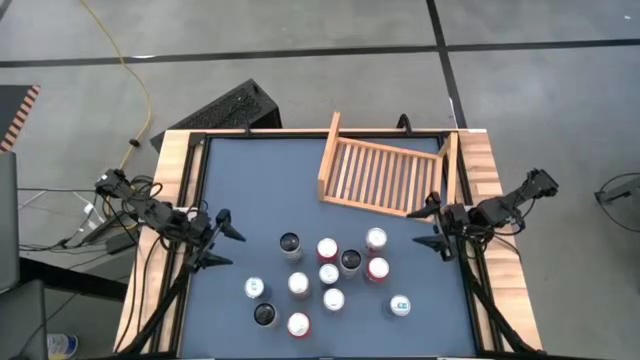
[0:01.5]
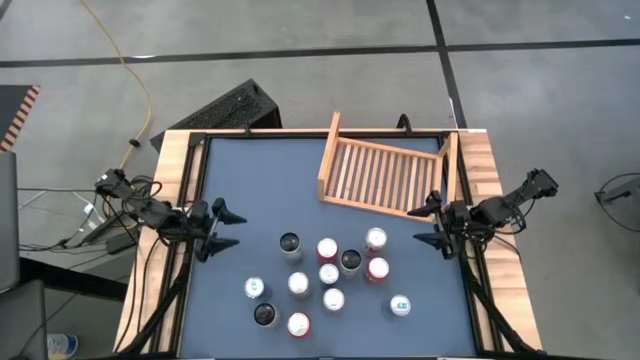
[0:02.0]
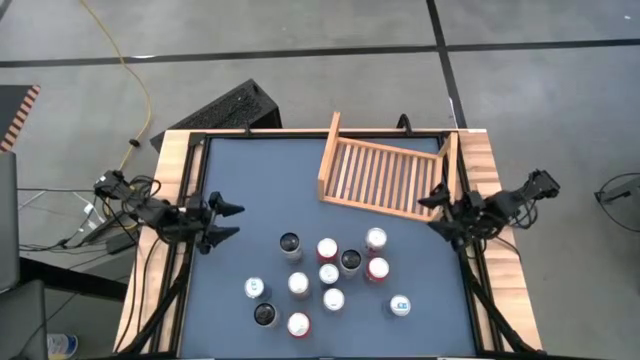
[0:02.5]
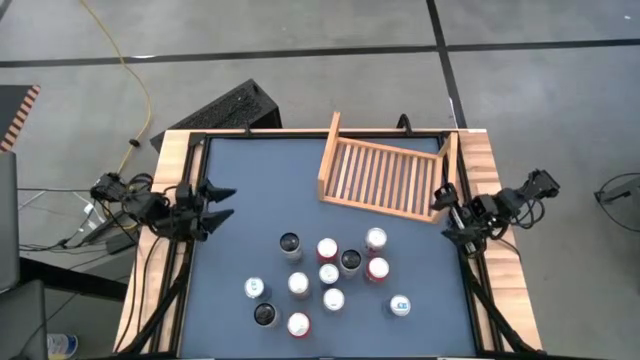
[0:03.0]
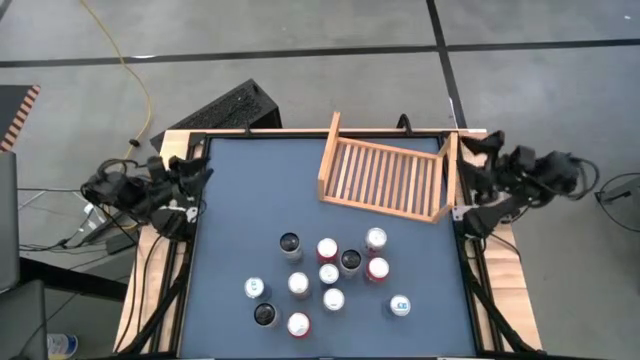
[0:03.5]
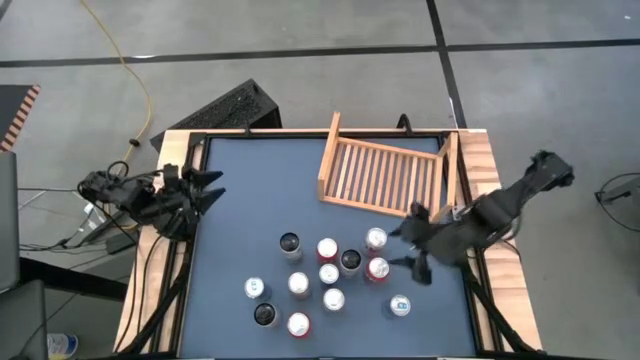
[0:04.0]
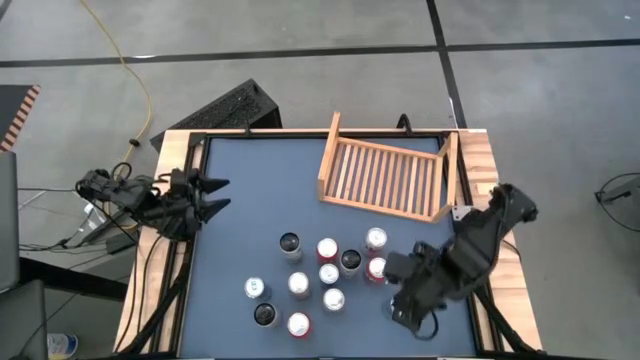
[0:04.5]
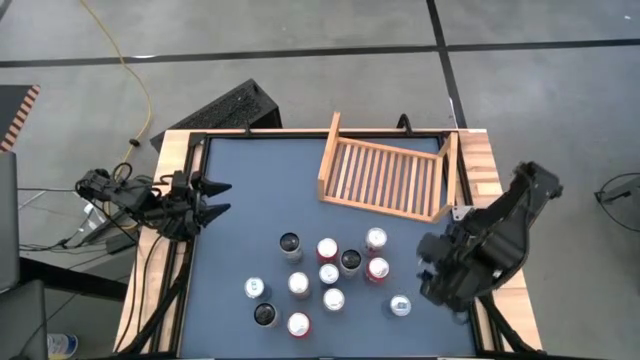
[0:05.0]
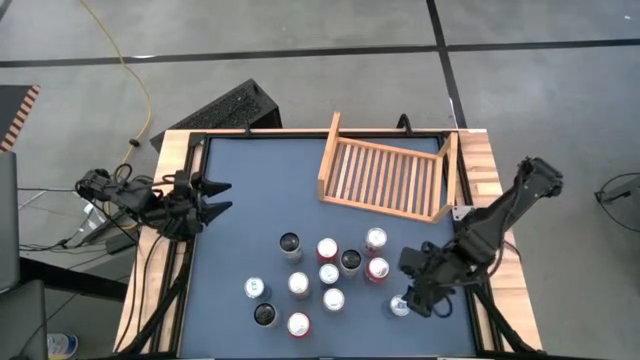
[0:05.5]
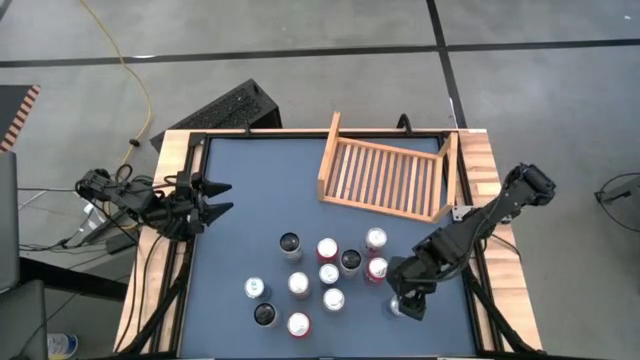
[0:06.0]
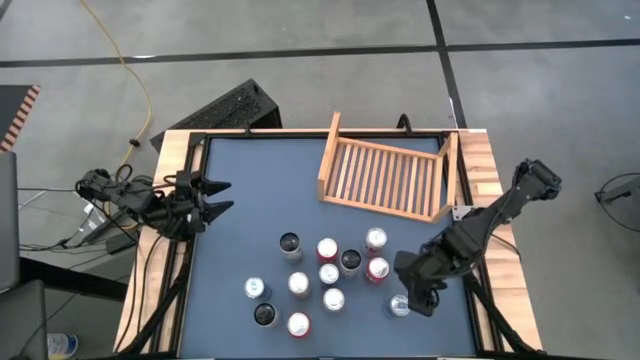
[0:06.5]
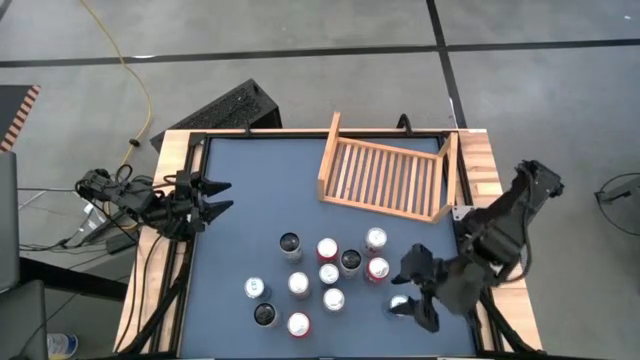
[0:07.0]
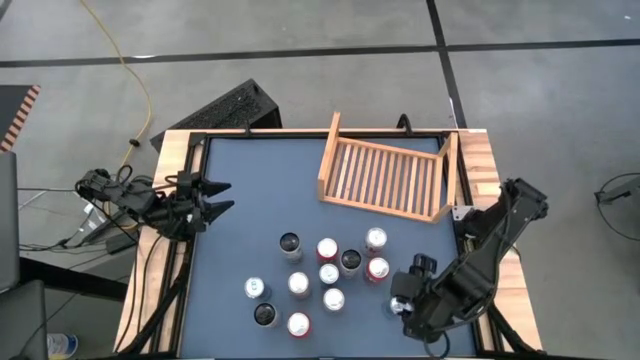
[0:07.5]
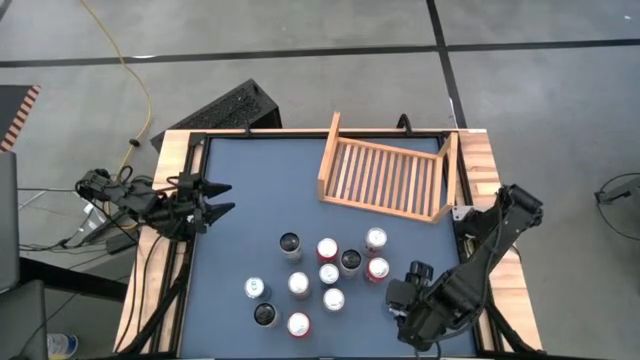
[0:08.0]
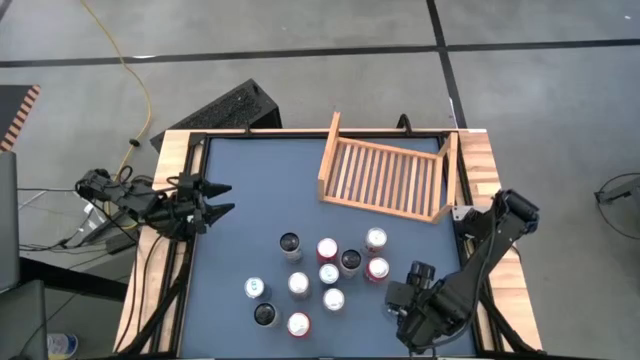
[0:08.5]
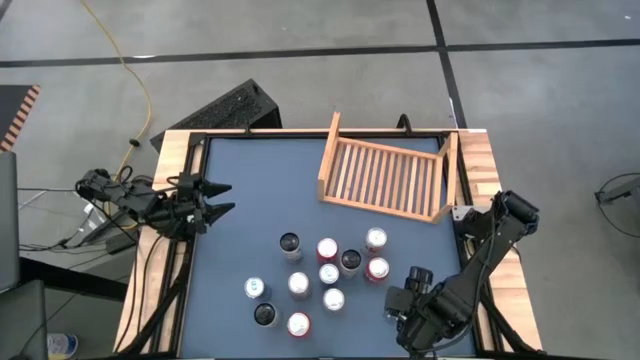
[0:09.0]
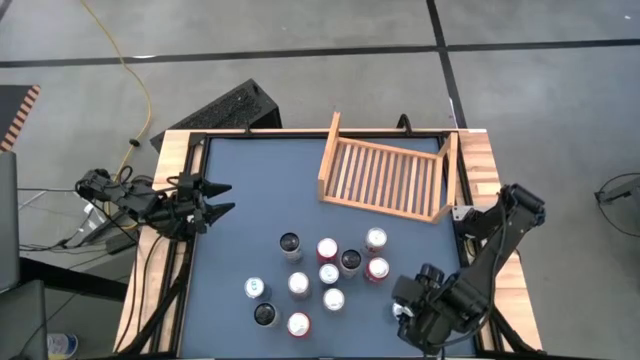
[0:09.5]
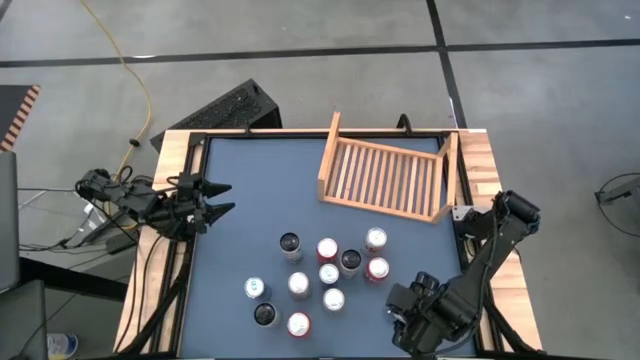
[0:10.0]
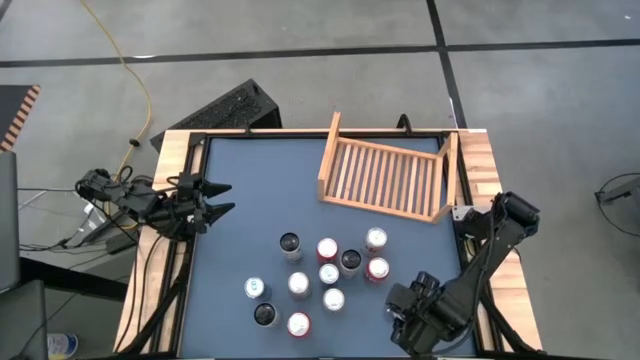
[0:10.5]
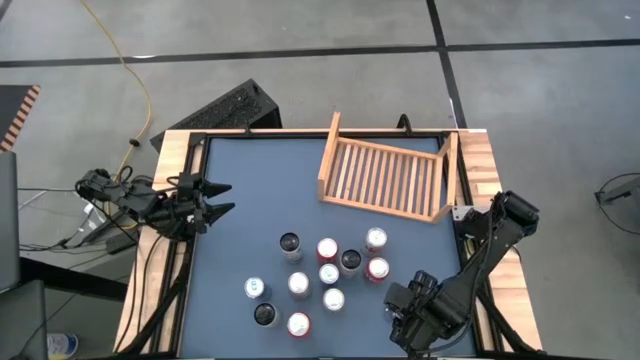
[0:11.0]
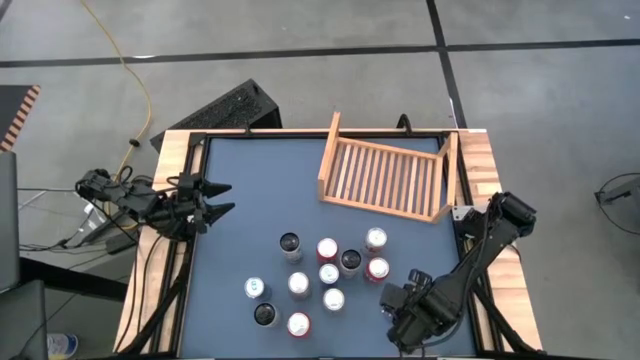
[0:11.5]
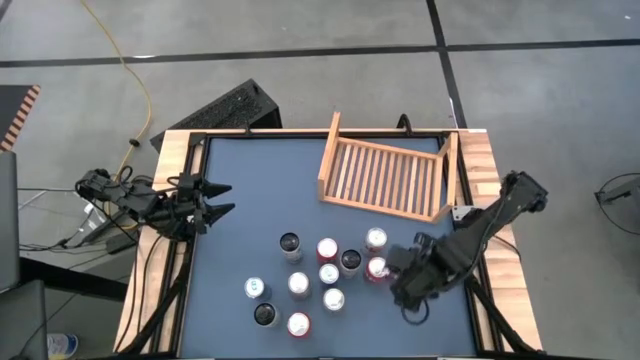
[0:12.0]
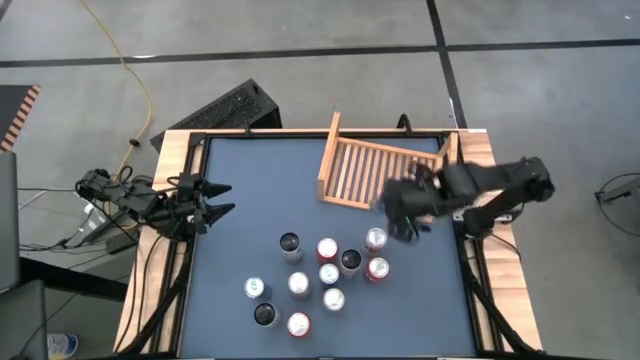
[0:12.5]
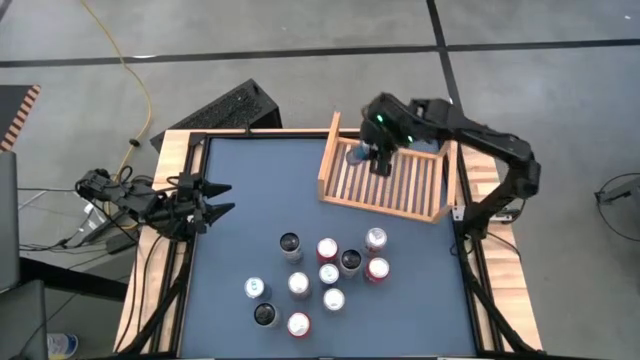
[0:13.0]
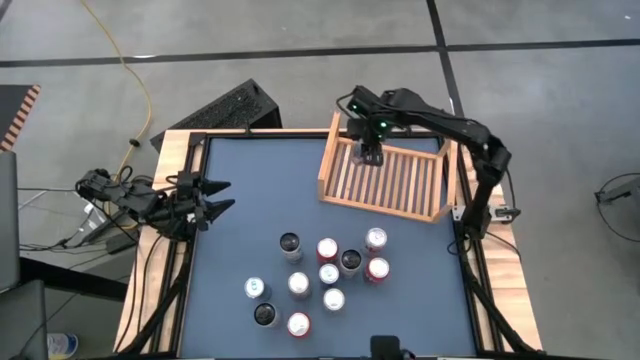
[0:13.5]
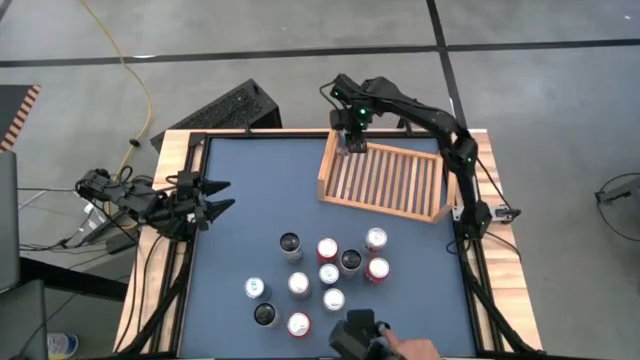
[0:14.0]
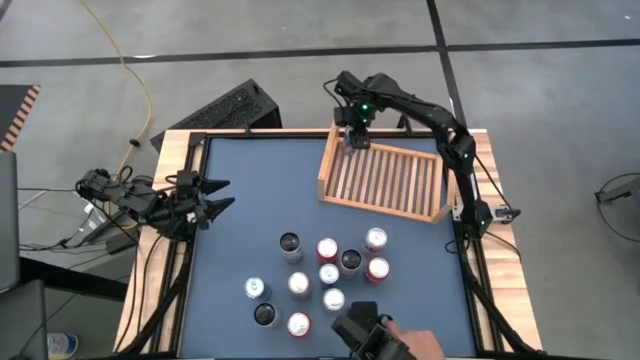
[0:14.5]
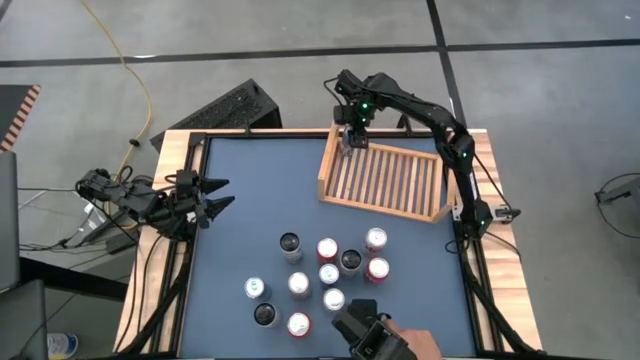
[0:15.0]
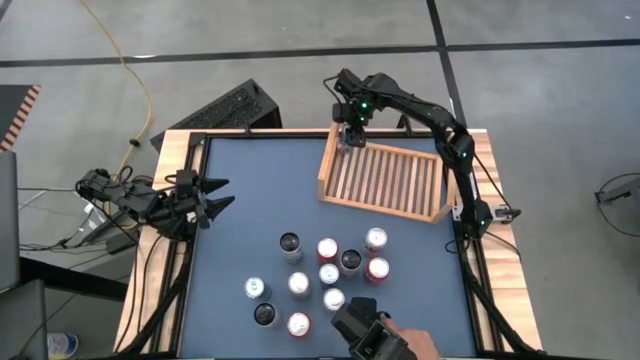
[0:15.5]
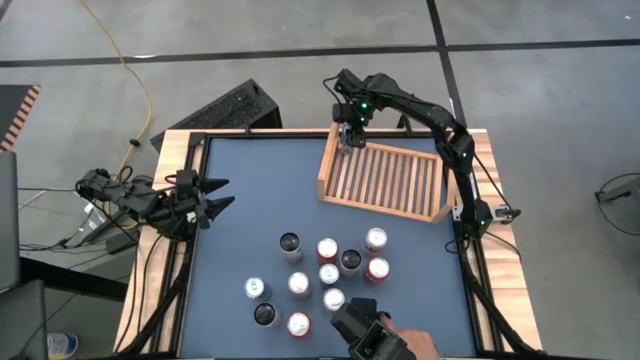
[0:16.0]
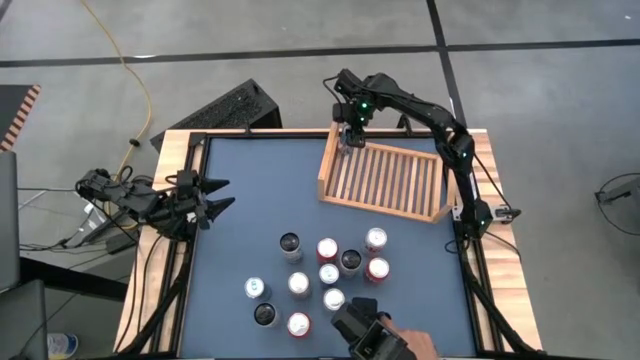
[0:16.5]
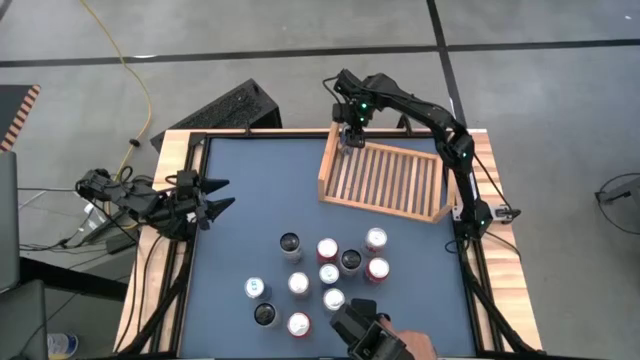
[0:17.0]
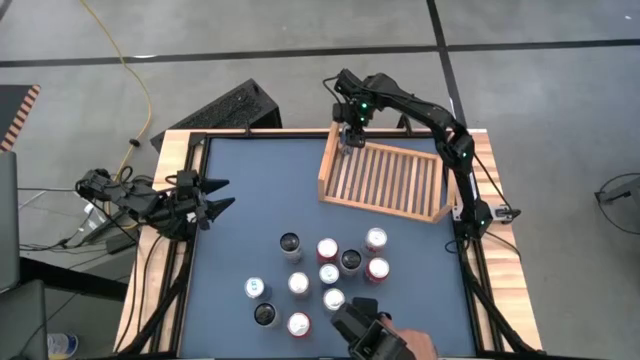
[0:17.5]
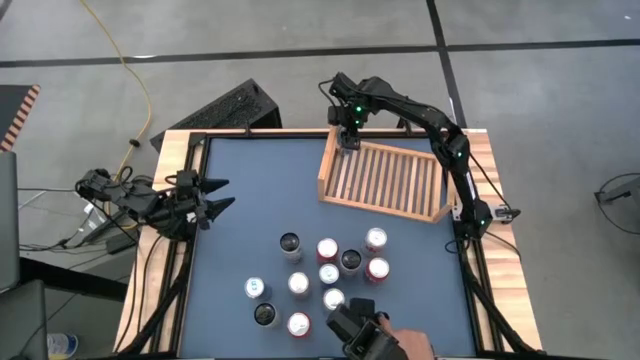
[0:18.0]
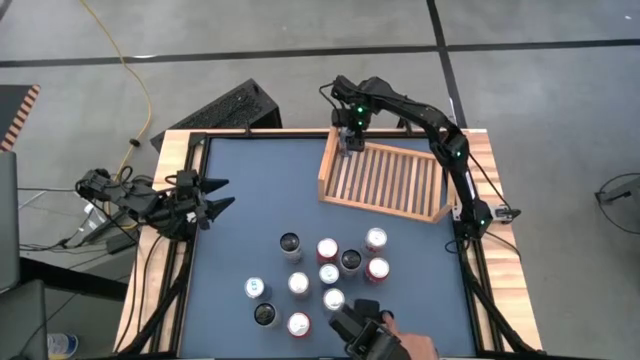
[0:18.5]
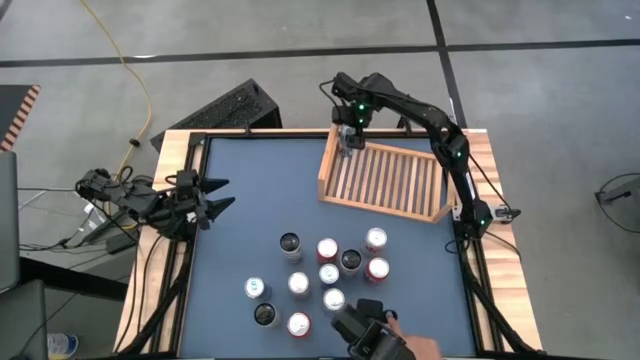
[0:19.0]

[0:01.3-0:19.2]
Task: Place canned beverage on shelf
Put the right blue soda can on the shelf

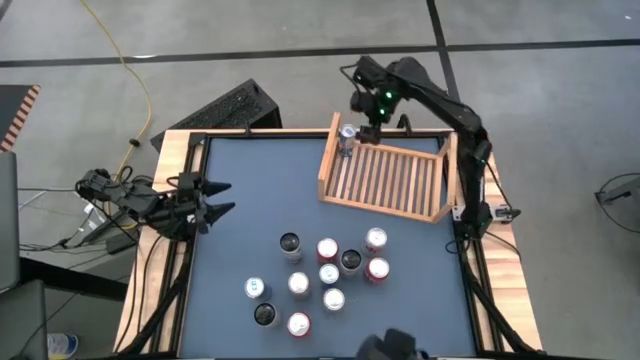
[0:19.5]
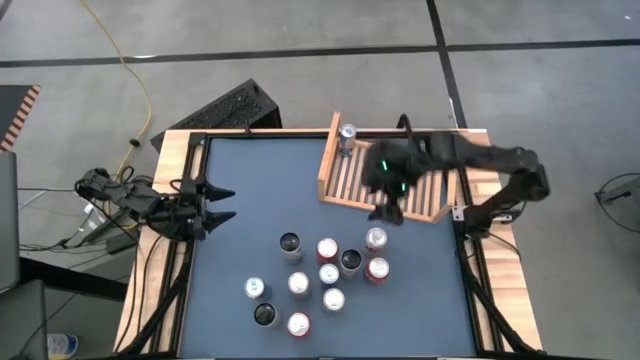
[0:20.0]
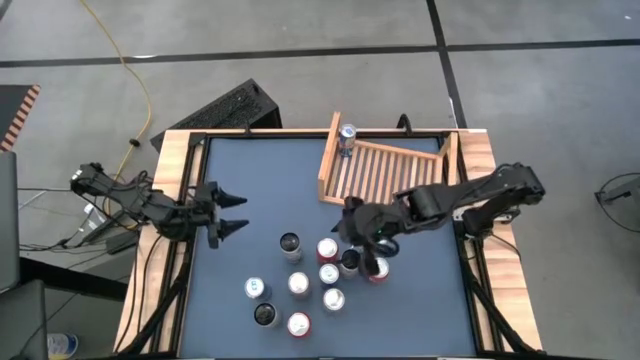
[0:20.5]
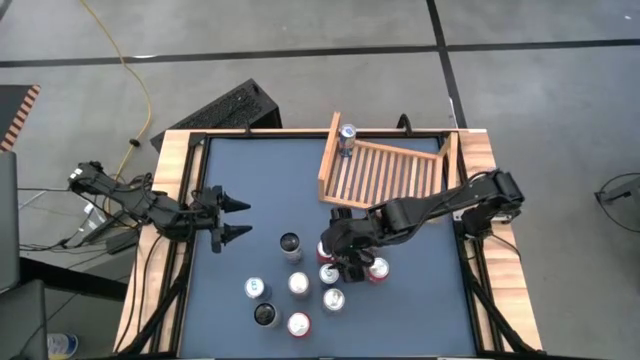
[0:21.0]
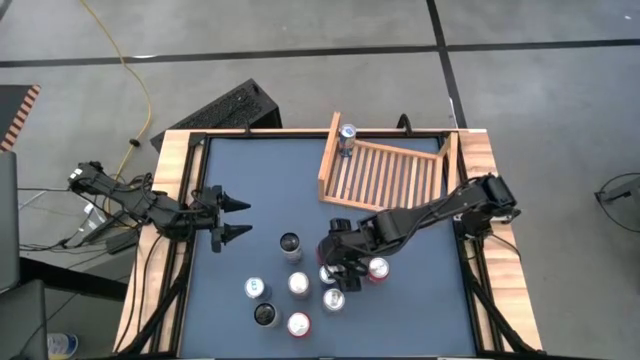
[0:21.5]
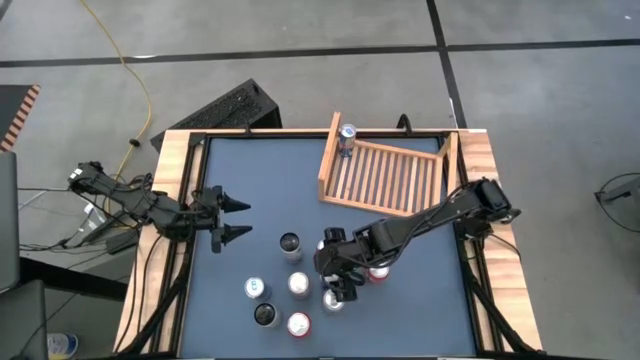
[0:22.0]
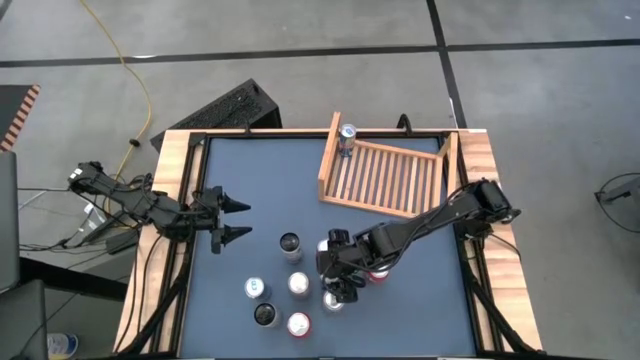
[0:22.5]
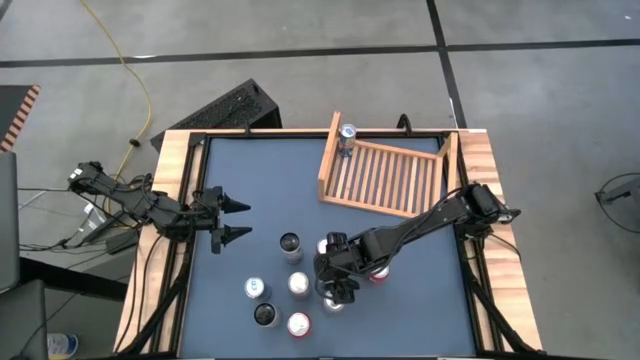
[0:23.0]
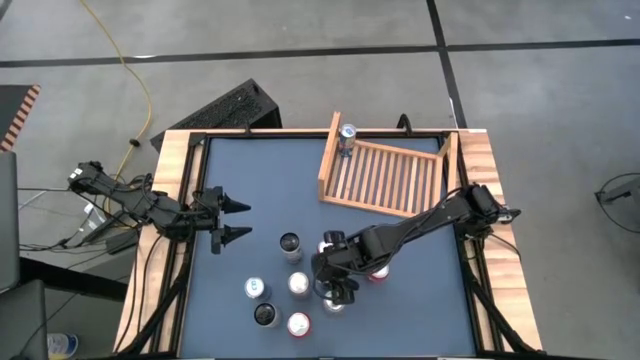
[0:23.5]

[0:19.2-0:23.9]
Put the right blue soda can on the shelf aligned with the other blue soda can
